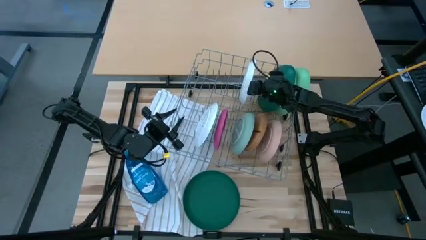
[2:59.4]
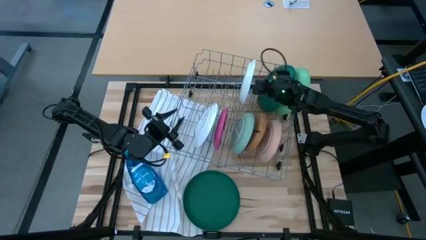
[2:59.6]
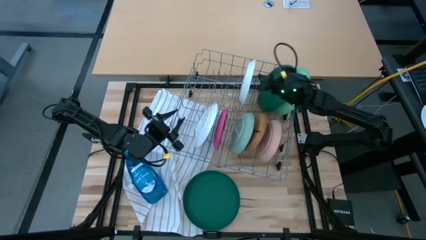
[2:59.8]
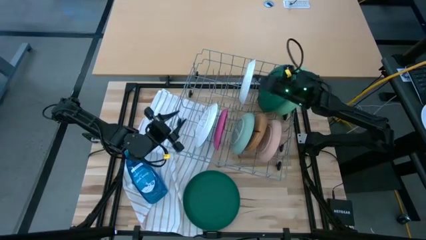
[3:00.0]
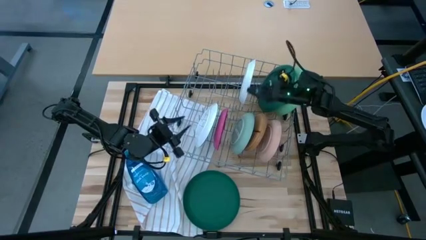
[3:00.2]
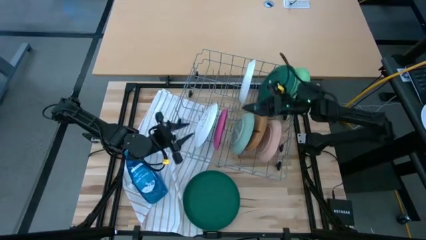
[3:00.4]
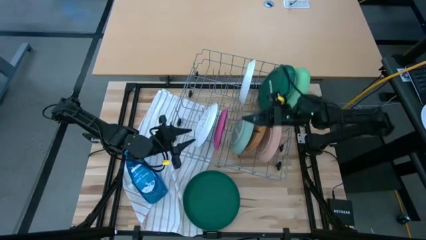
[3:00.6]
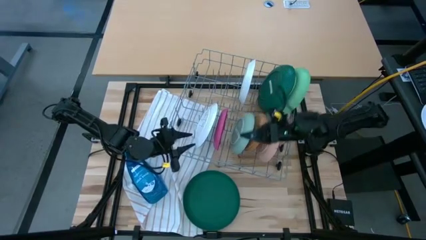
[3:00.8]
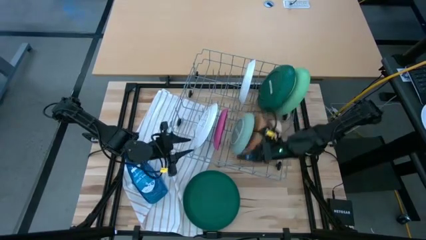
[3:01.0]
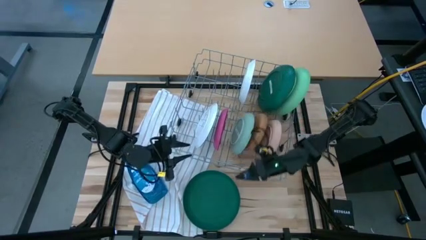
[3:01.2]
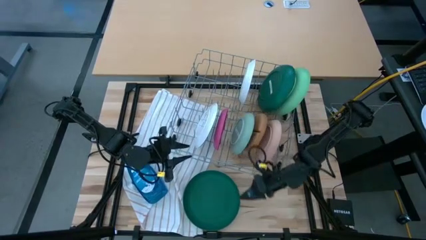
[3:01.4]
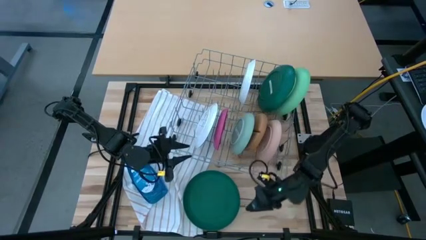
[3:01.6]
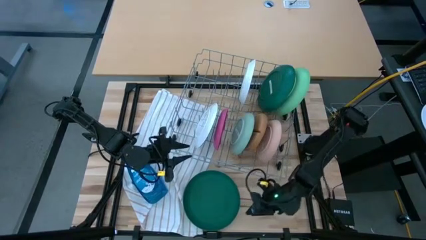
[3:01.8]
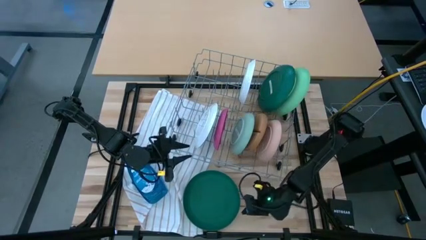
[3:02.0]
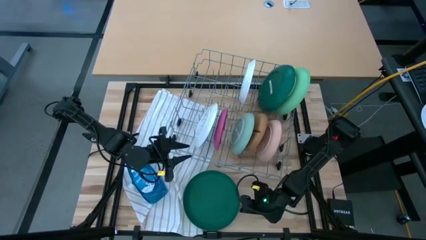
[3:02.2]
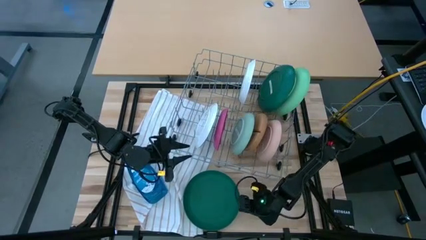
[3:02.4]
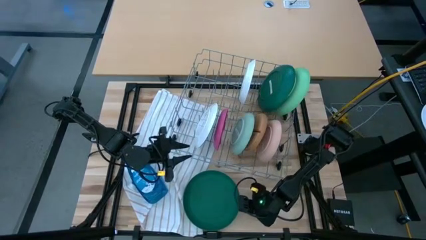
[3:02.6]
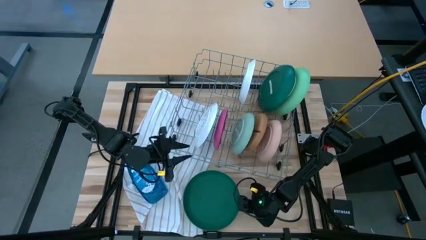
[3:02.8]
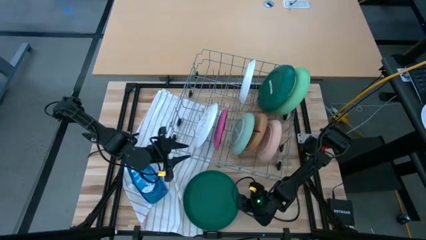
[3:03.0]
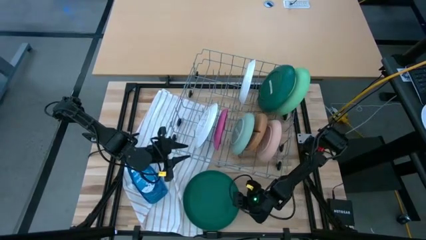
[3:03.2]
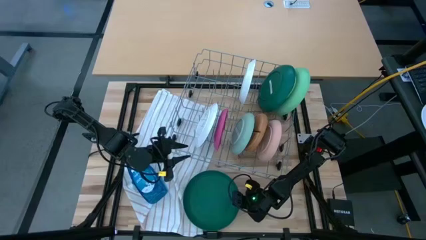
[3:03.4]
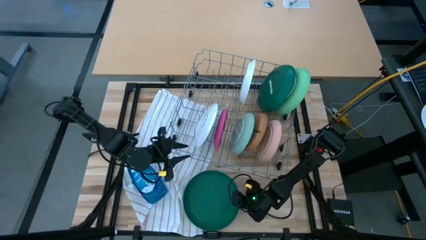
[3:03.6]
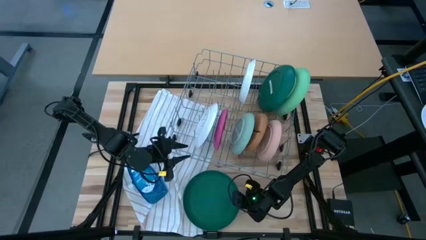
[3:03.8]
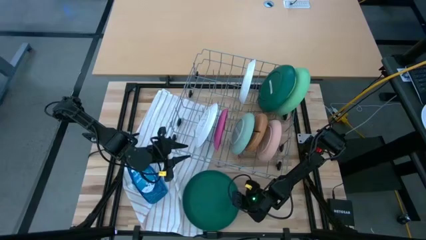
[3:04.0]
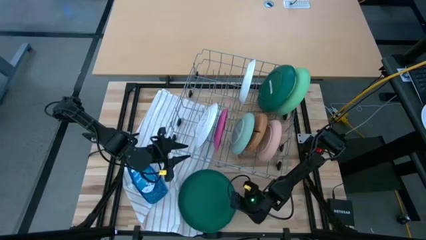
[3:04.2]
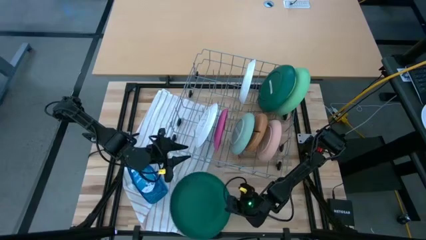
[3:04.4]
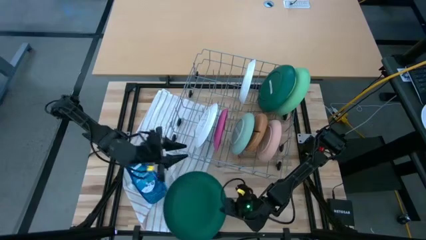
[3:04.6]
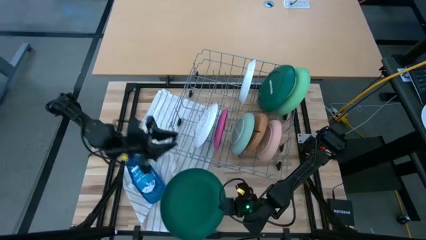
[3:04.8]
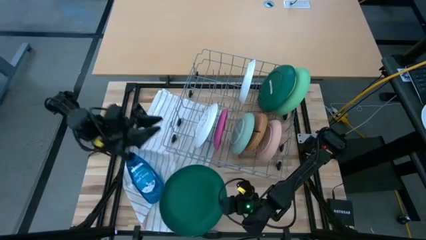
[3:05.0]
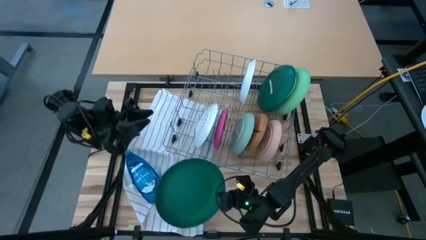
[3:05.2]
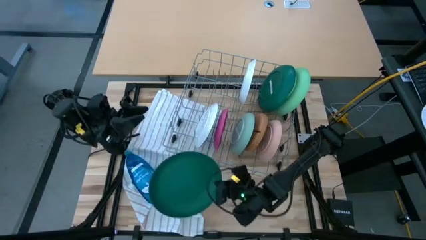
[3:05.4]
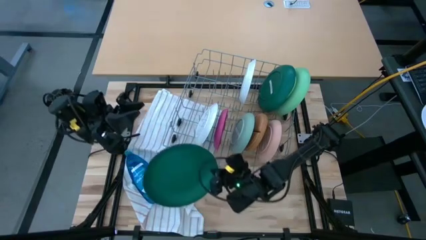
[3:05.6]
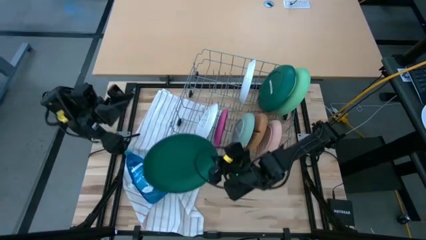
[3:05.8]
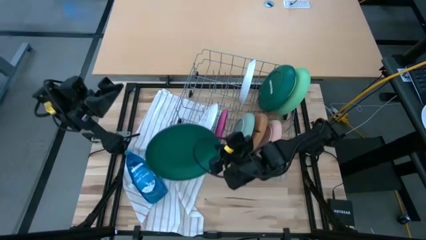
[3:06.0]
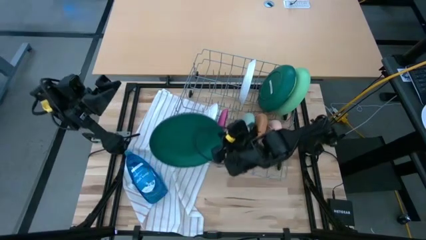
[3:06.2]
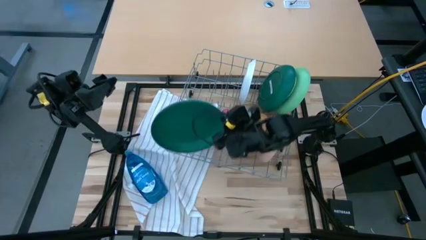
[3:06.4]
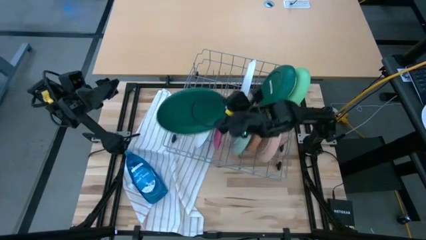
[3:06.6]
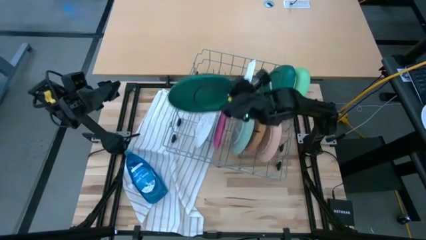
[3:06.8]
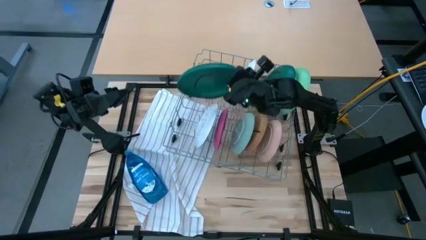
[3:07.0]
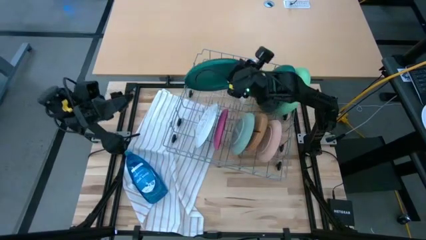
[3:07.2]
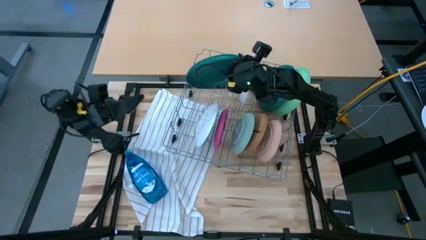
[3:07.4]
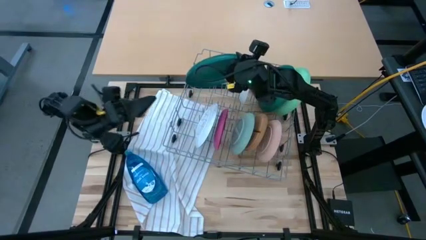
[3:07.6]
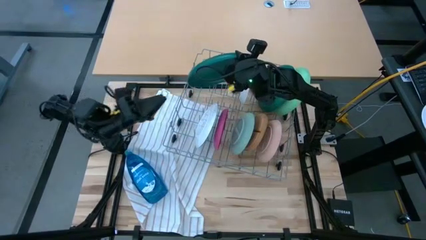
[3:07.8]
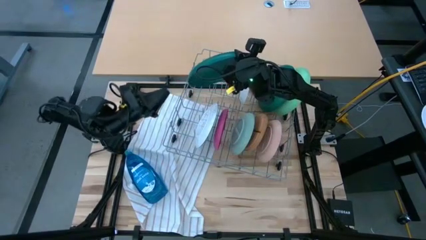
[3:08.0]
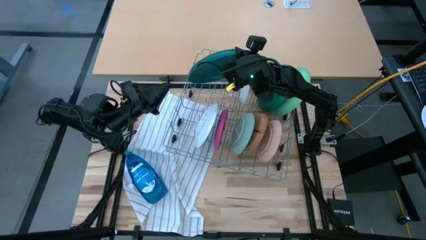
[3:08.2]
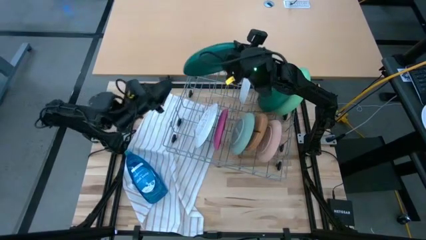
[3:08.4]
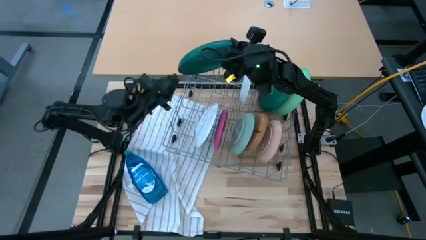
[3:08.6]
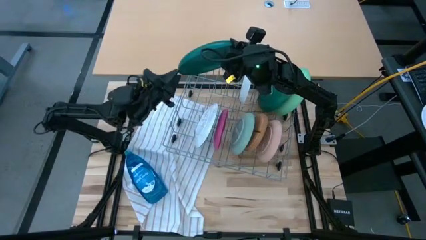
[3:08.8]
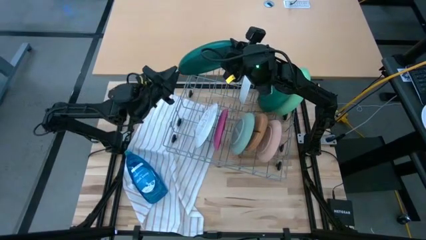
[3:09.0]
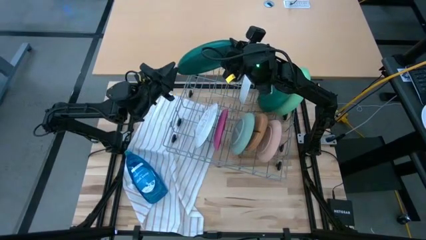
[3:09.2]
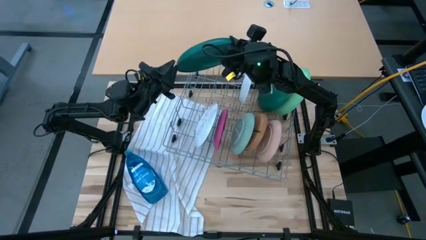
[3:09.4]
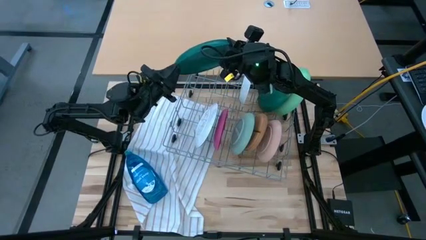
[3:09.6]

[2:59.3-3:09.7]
Task: Sort dishes
Put the dark green plate in the dish rack

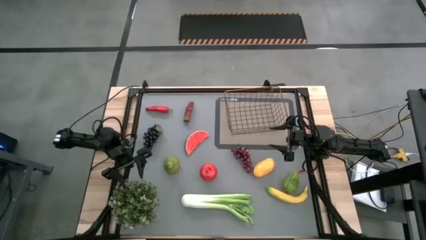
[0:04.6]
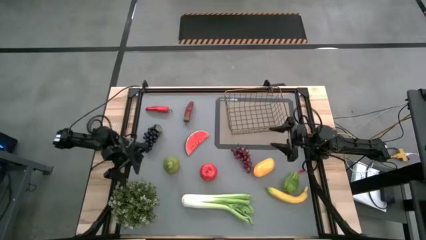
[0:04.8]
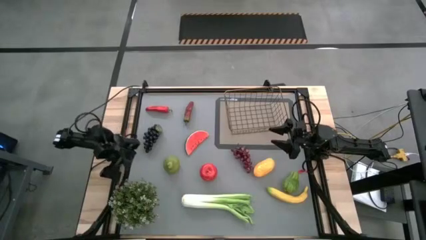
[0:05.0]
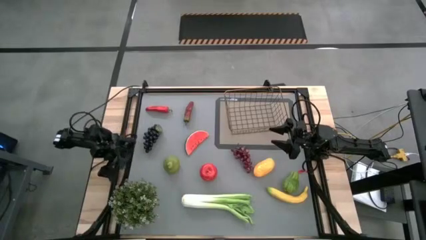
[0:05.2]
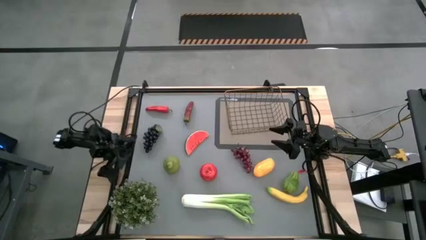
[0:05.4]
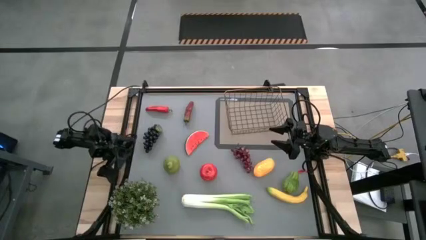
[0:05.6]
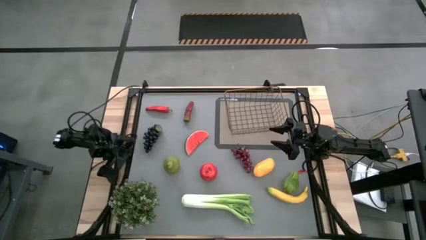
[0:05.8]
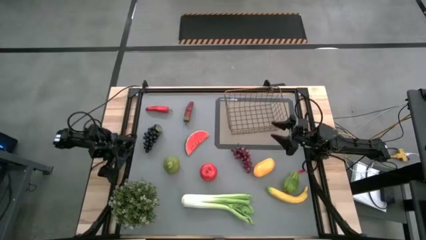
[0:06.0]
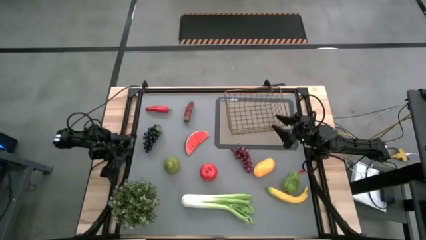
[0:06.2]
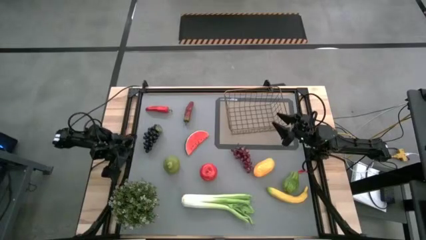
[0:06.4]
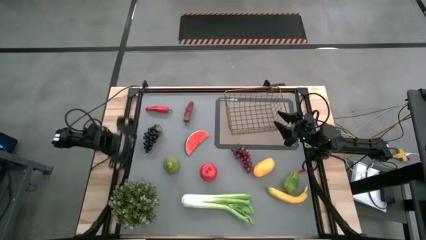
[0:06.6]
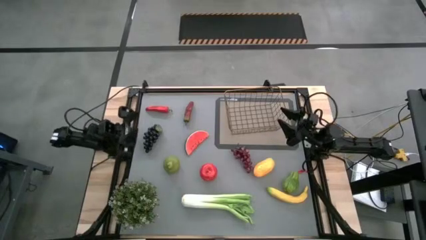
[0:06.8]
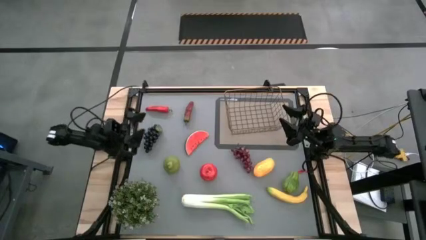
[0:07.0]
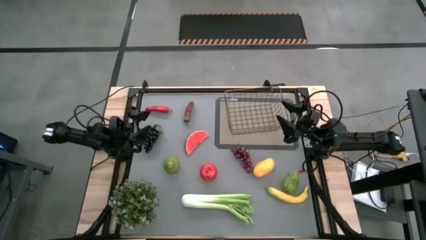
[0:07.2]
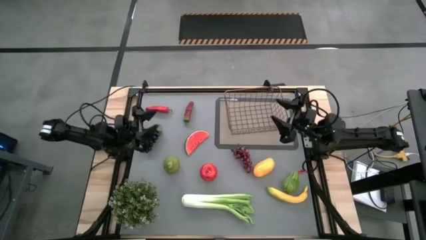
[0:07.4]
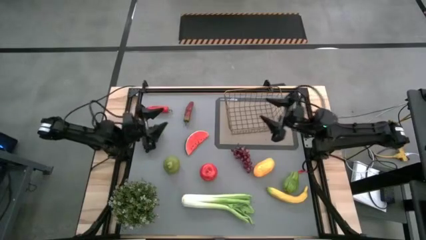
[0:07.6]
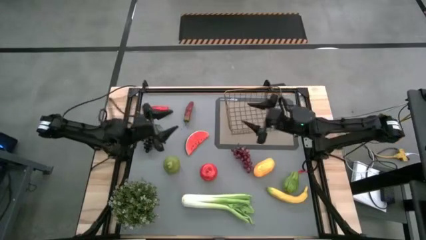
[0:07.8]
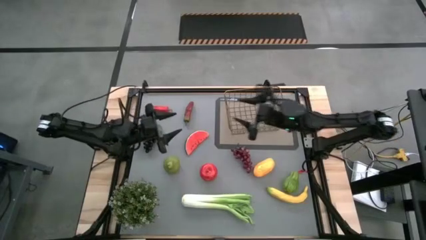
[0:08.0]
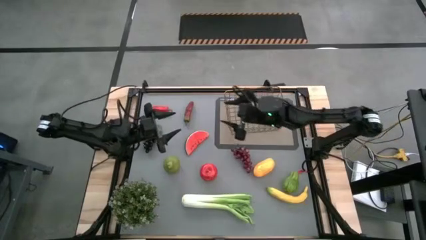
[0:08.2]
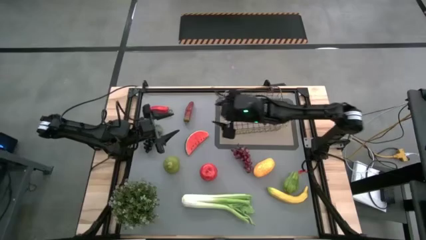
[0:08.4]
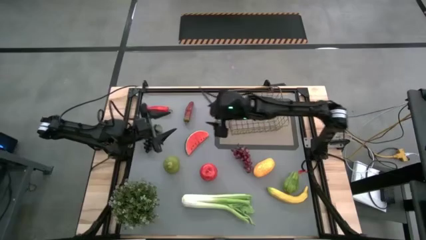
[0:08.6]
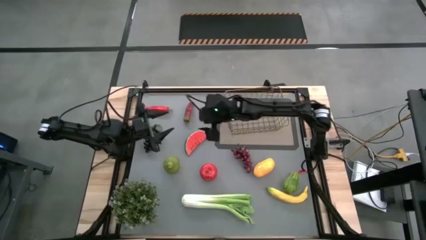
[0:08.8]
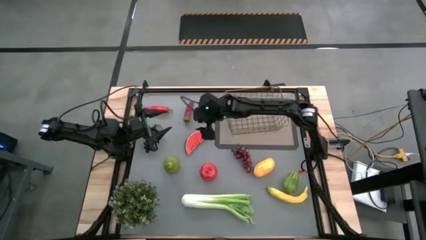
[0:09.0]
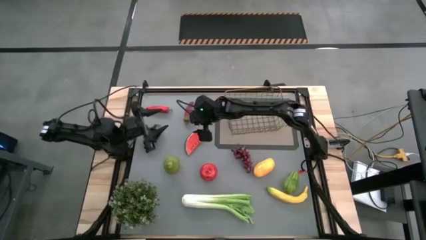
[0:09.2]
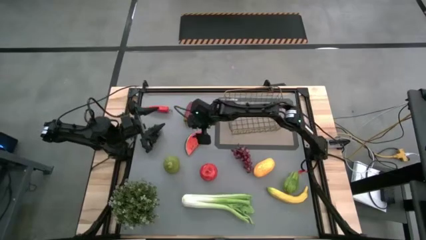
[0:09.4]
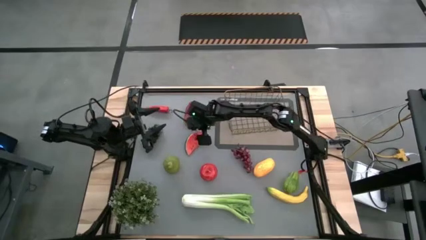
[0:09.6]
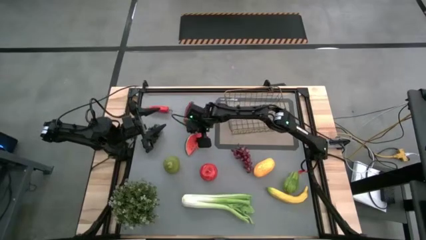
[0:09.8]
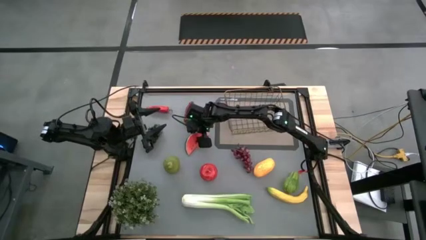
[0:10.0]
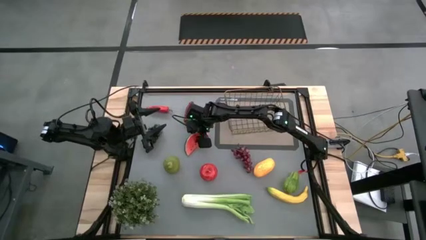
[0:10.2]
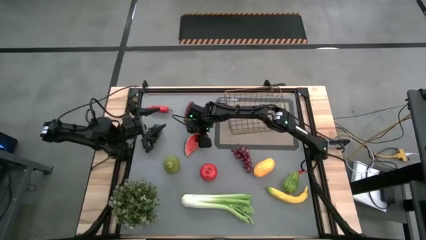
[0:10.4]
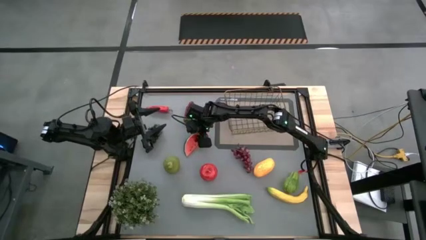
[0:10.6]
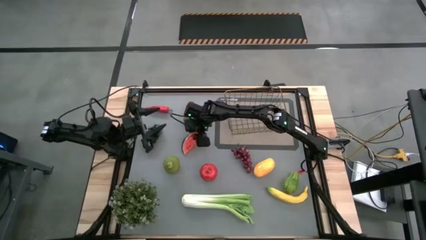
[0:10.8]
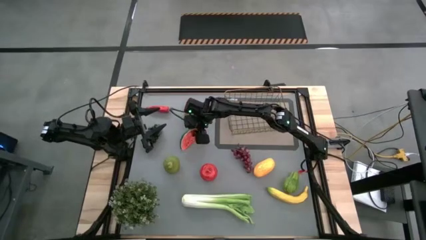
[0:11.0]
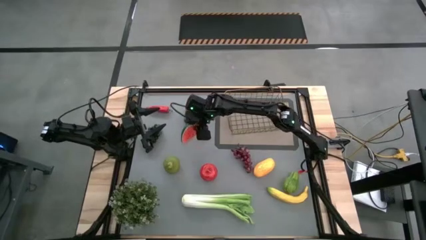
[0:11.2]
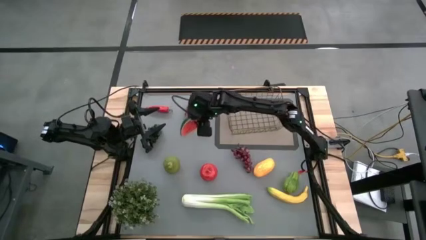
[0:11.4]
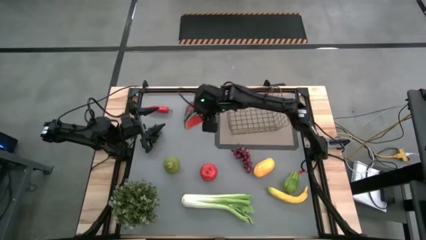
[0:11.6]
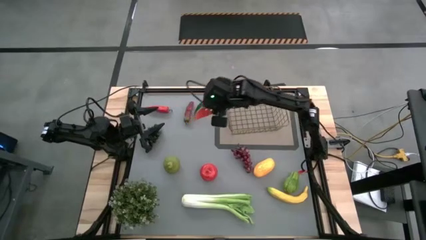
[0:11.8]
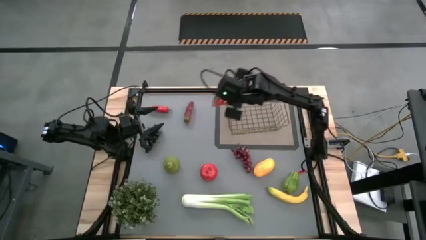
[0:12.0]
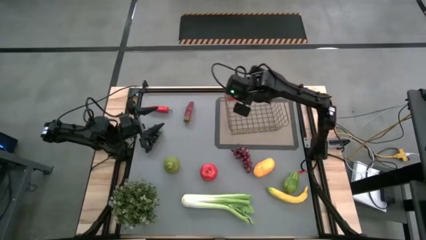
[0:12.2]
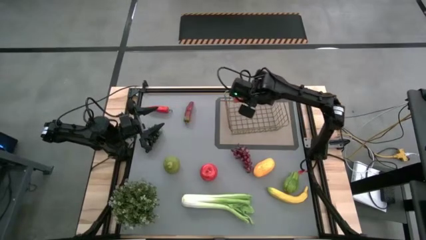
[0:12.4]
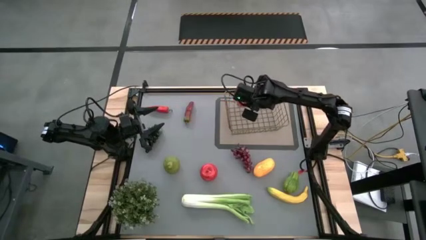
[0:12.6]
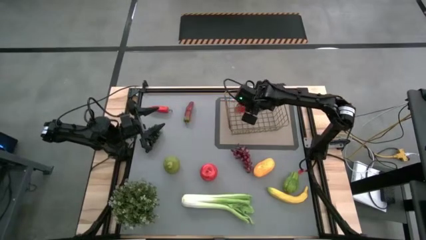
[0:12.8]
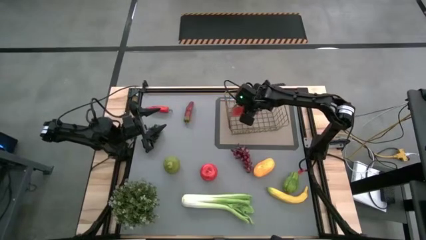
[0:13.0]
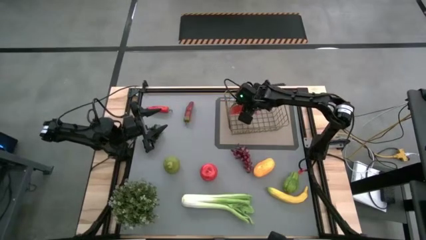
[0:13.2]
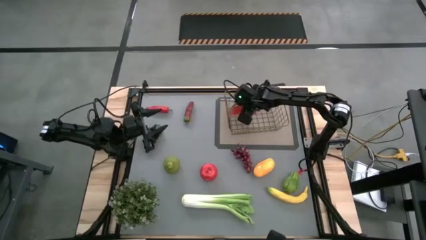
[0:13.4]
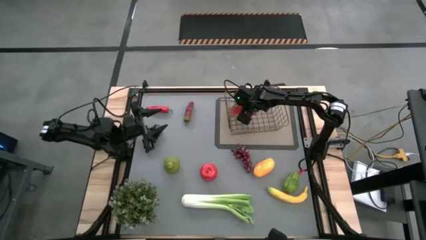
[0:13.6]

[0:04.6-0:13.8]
Task: Build produce basket
Put the watermelon into the wire basket
